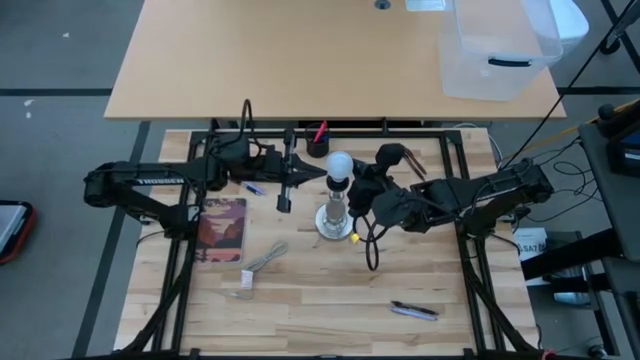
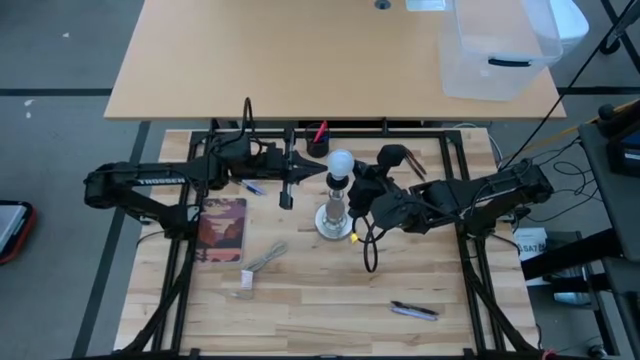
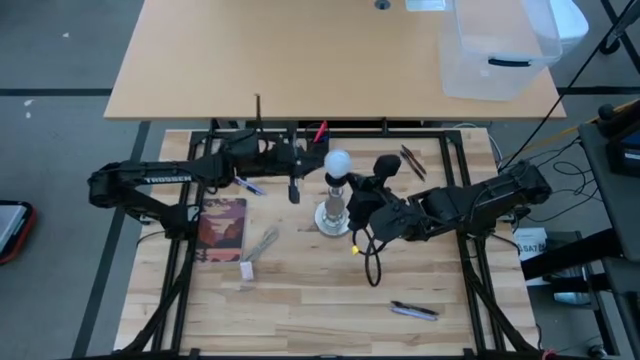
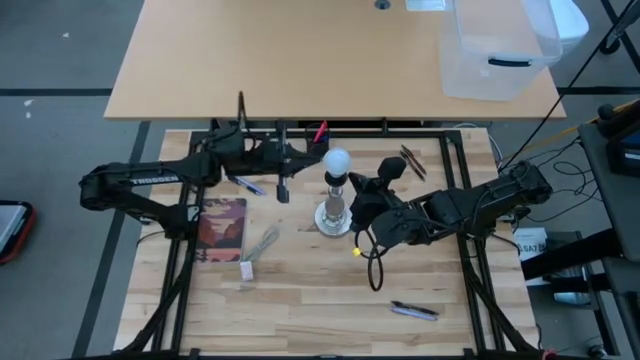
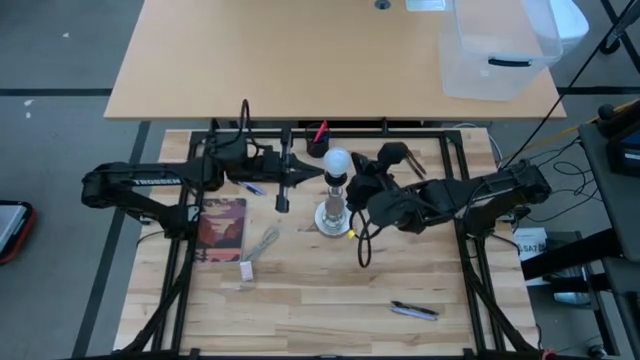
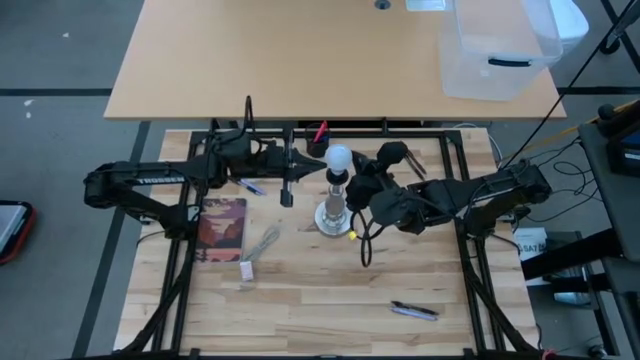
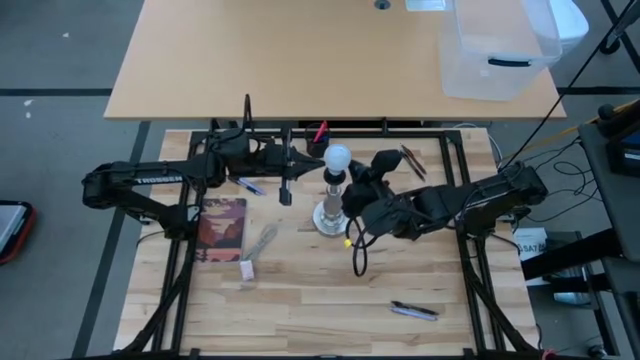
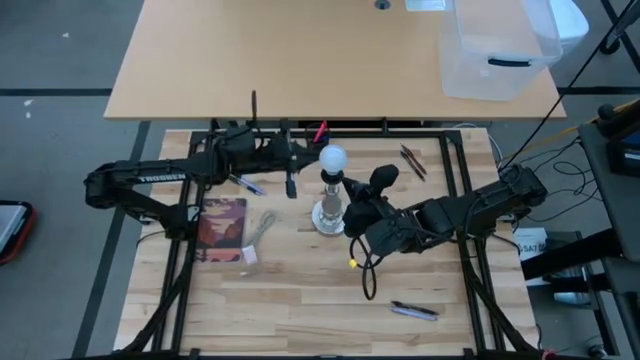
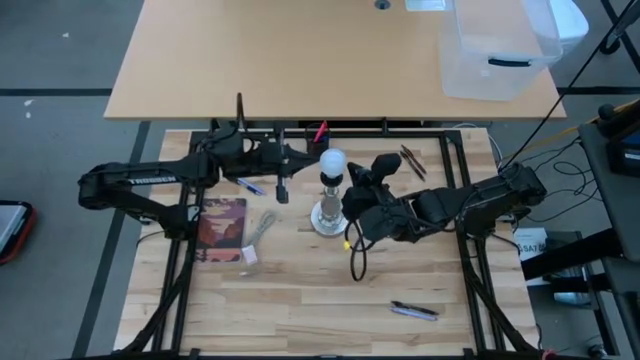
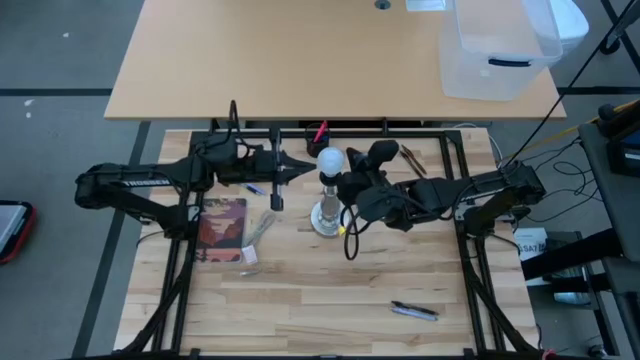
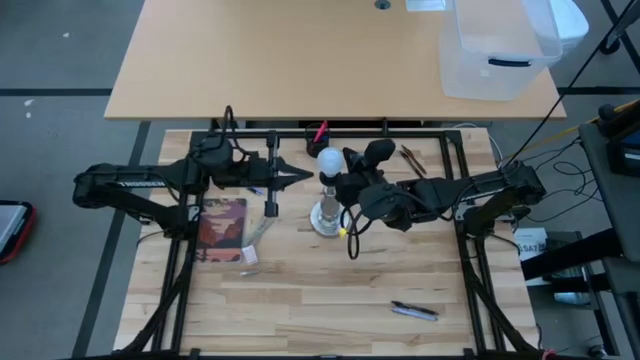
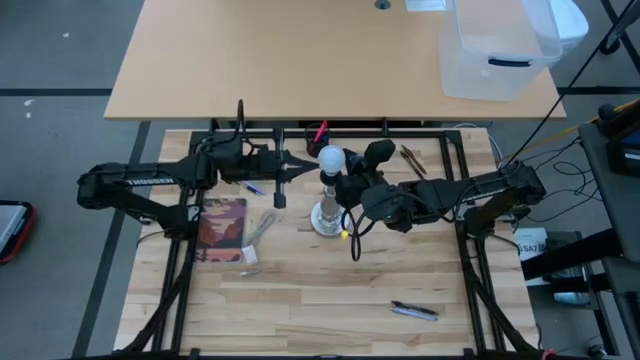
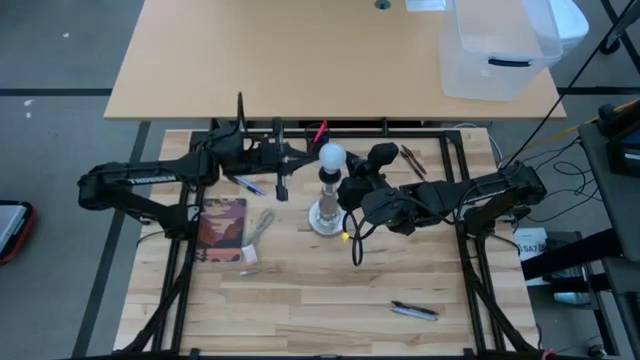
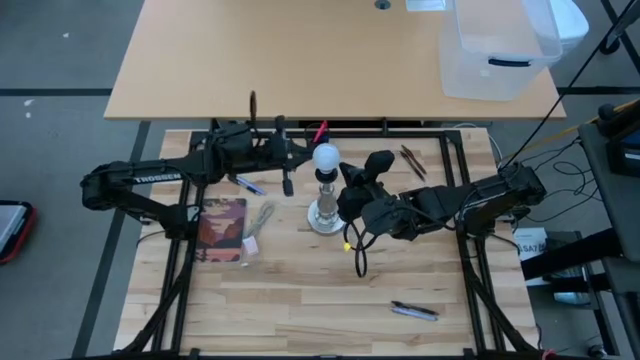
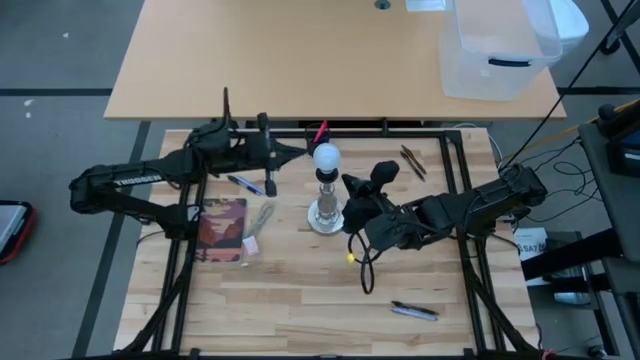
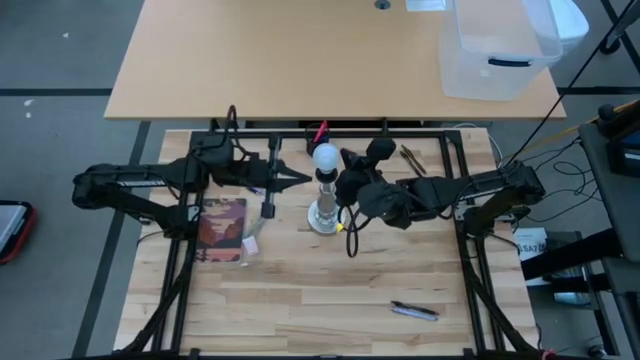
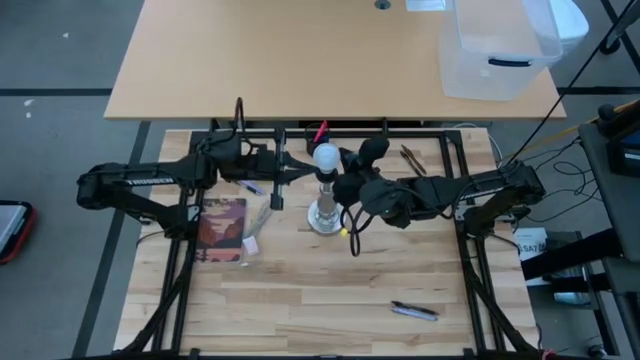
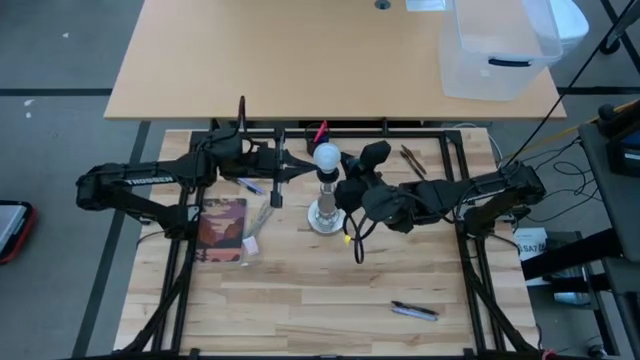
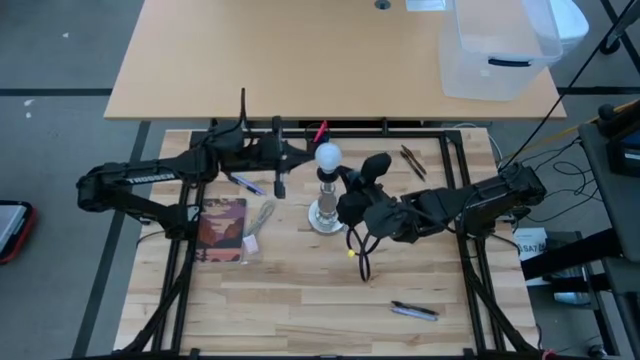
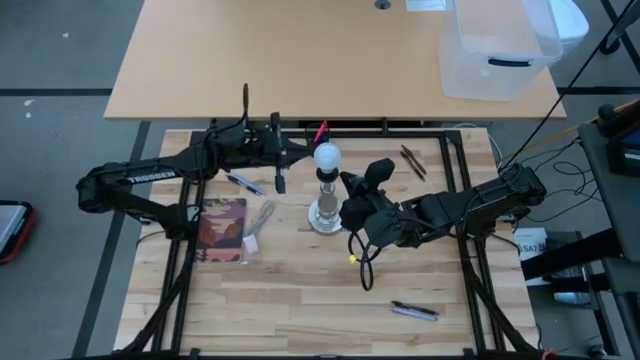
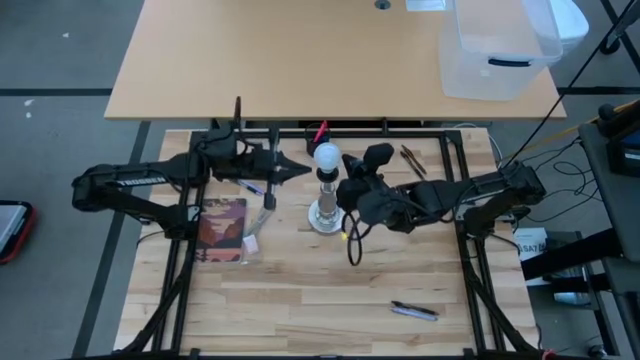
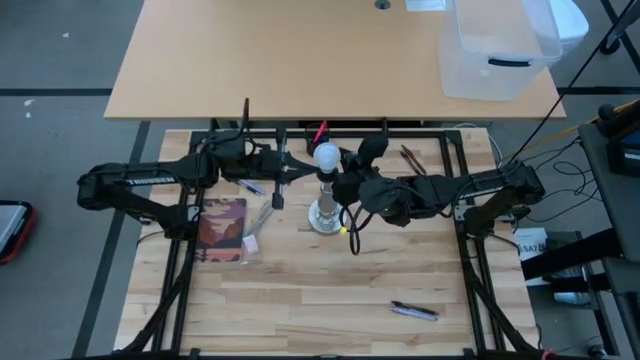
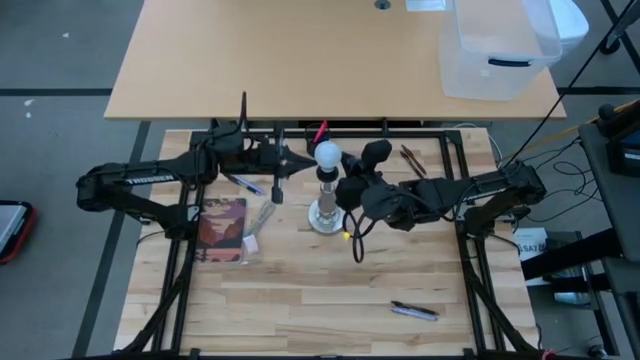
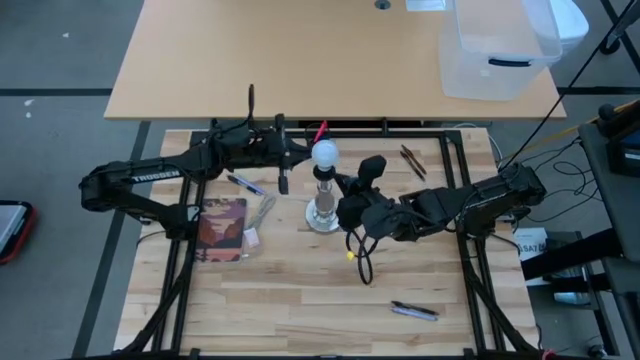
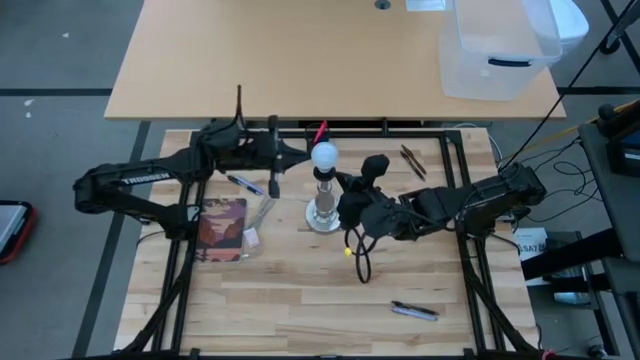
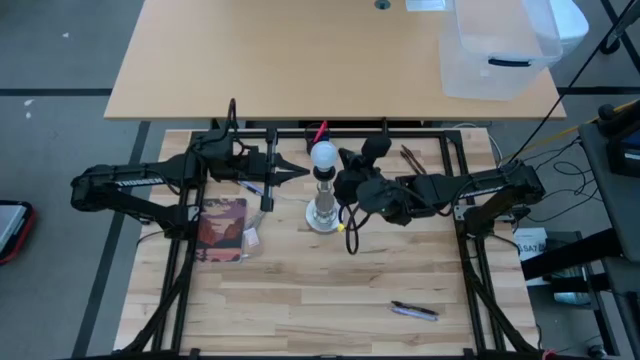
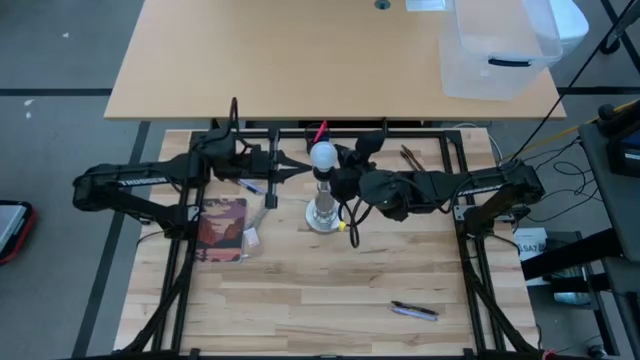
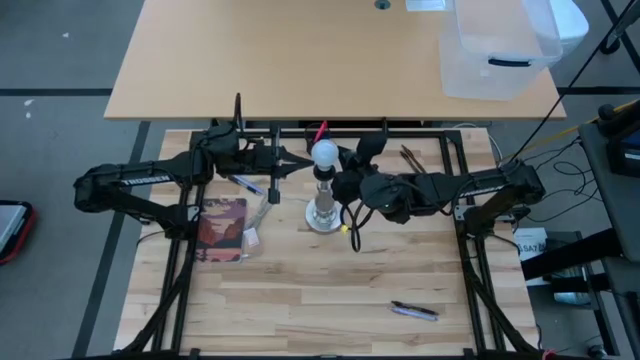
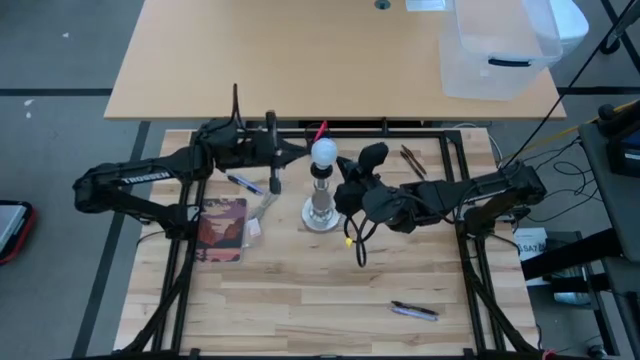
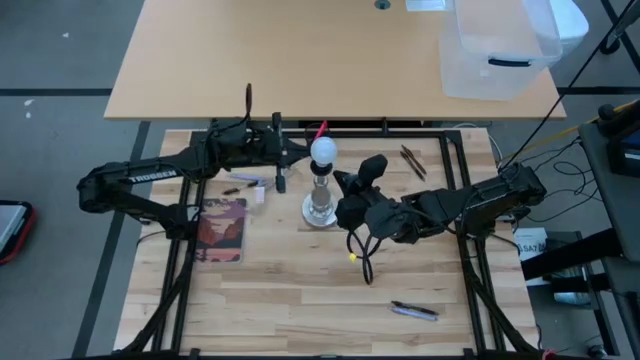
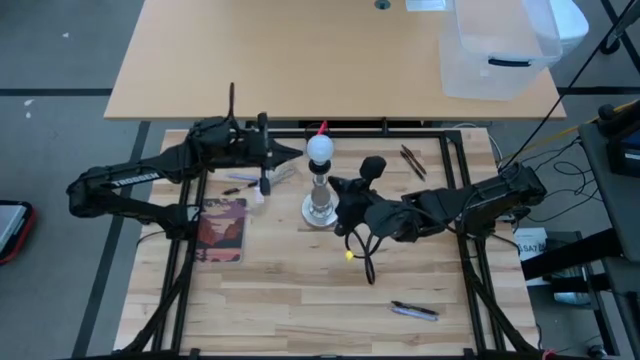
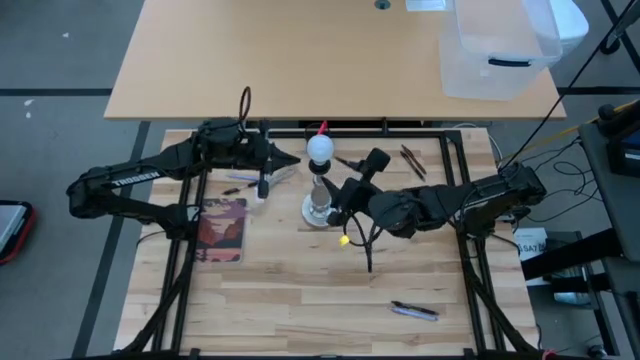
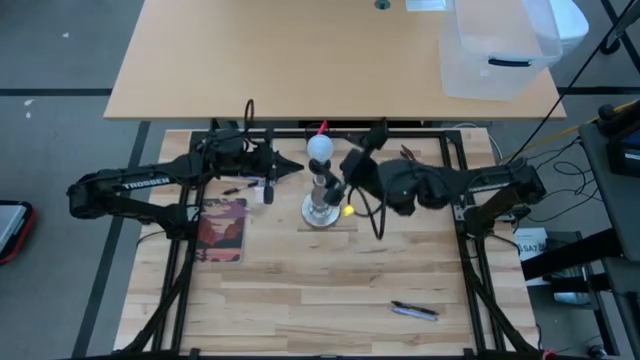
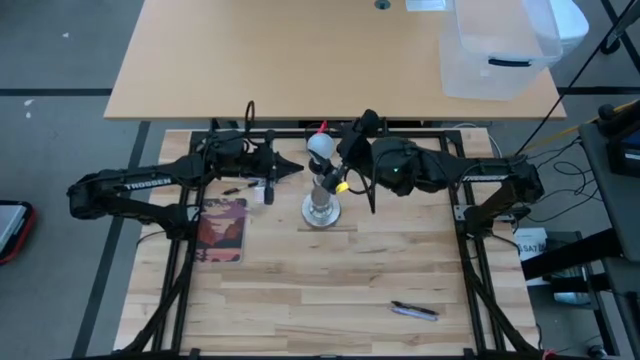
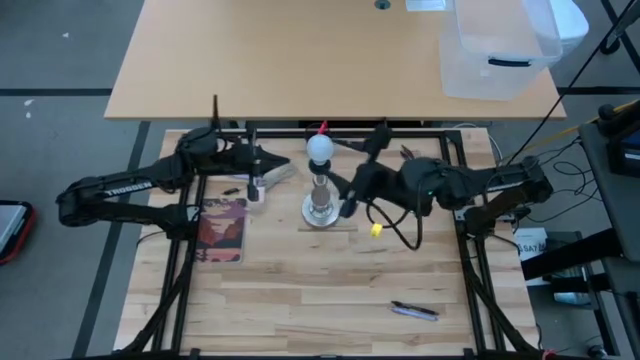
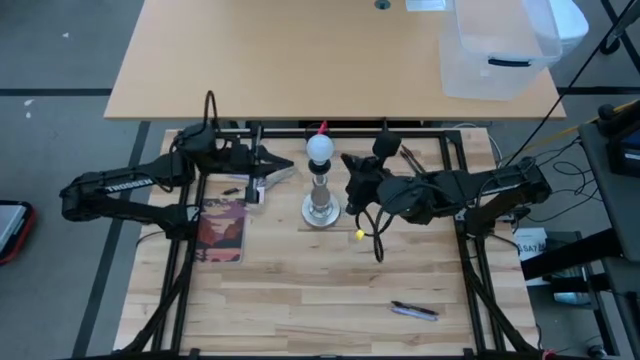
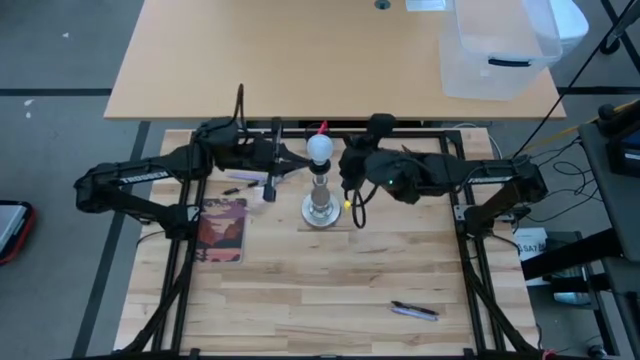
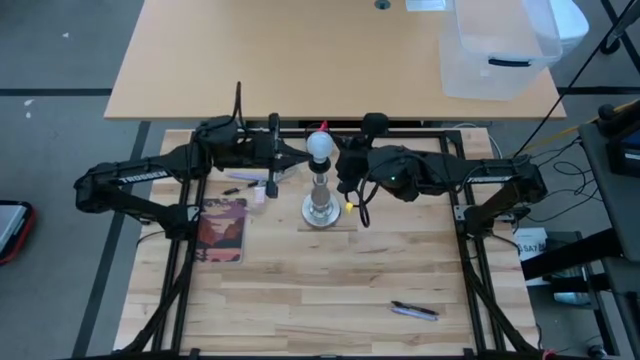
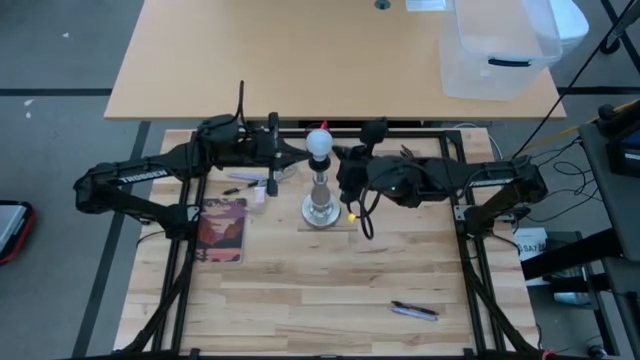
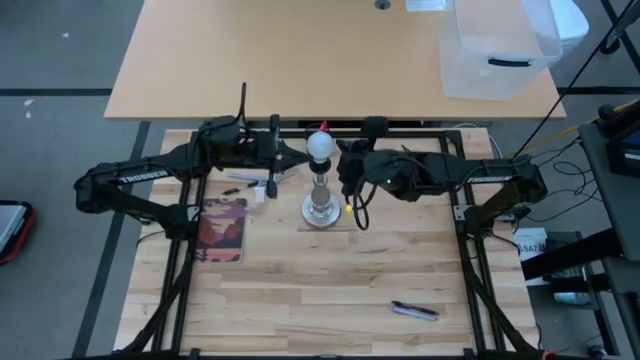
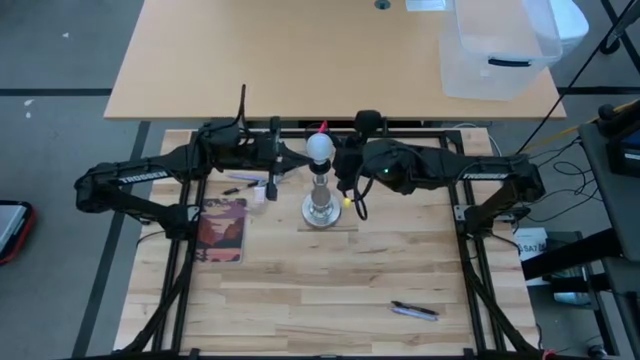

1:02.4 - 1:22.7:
Task: Screw lightbulb
Insert the lightbulb into the desk lamp

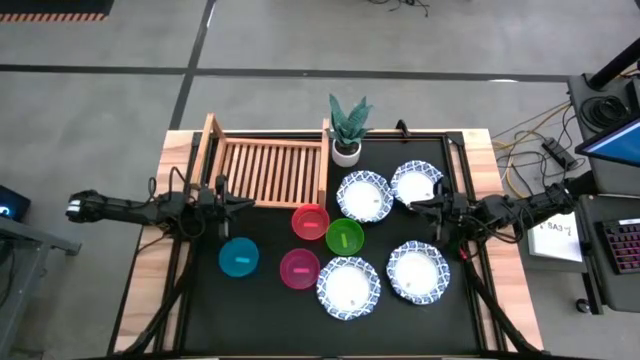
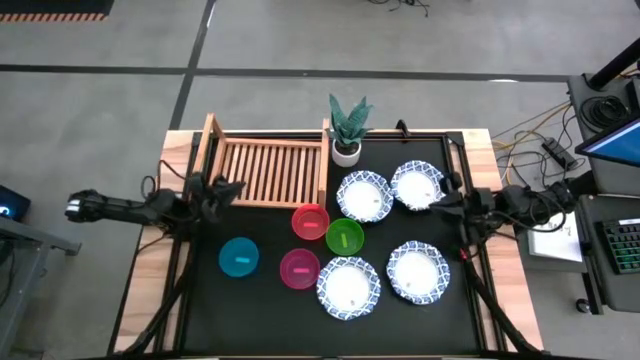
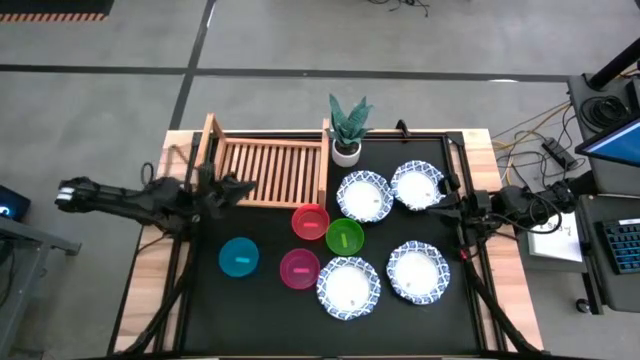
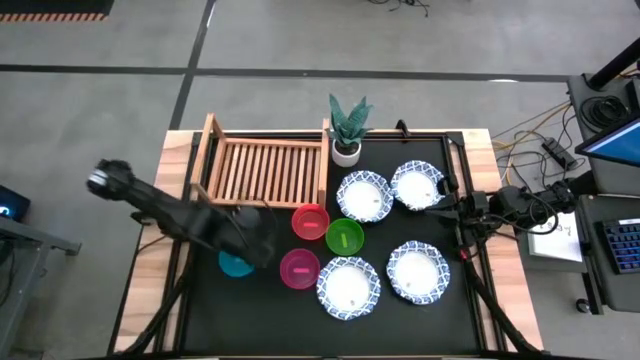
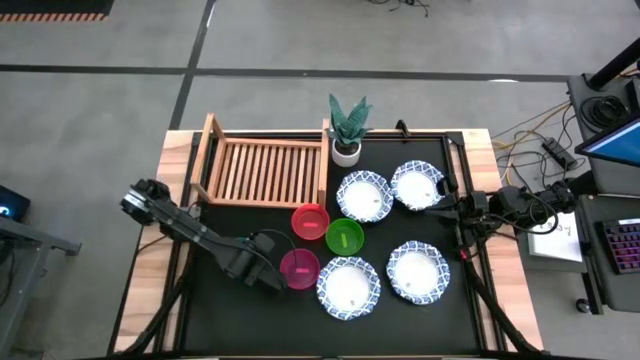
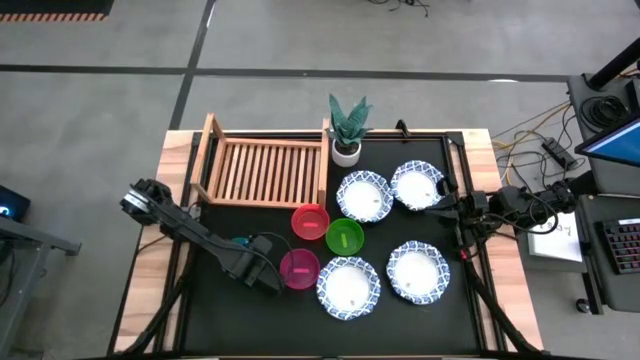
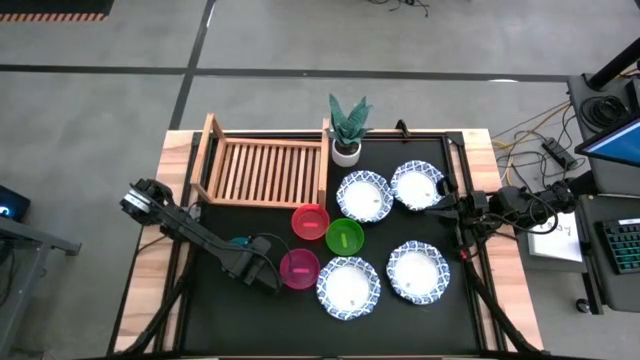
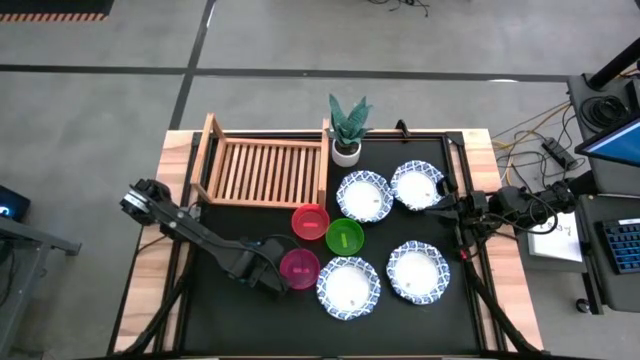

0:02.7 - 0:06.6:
Task: Place and stack bowls onto a shelf
Put the blue bowl on the shelf
